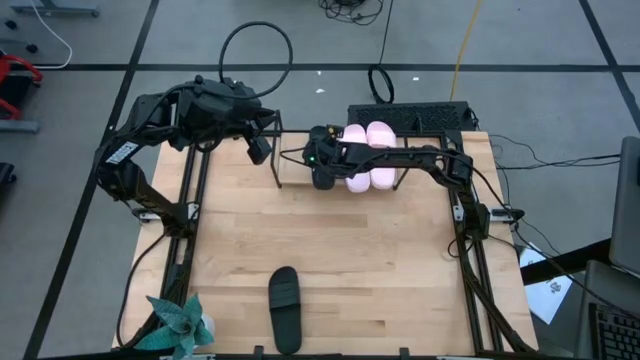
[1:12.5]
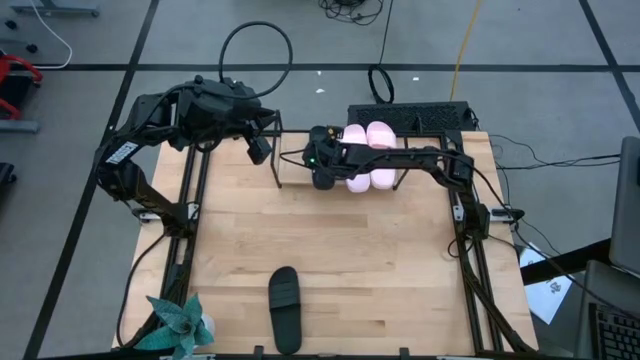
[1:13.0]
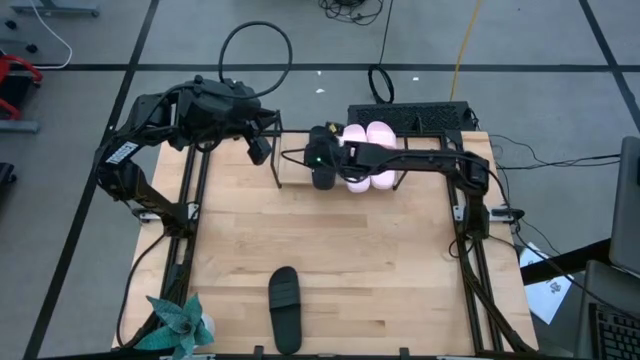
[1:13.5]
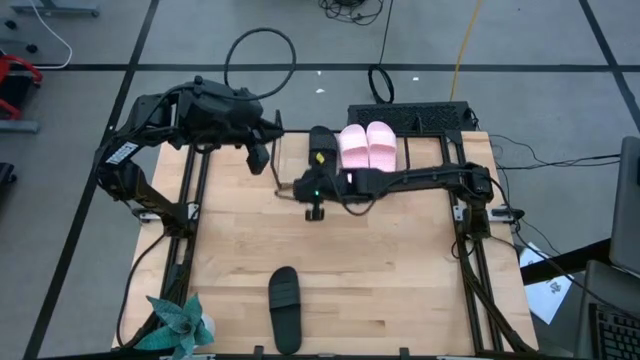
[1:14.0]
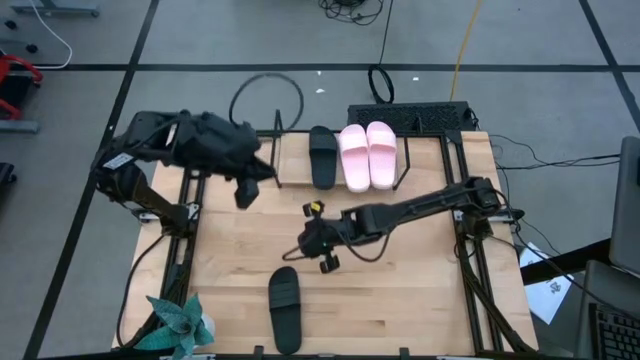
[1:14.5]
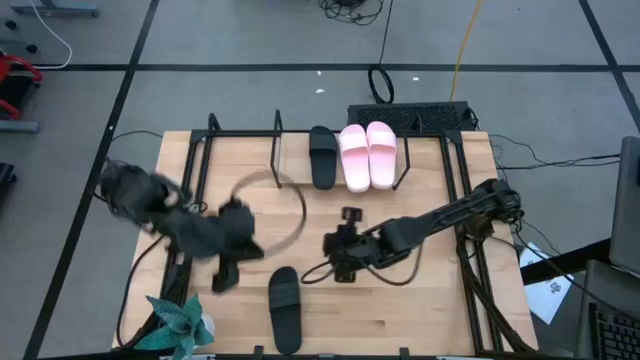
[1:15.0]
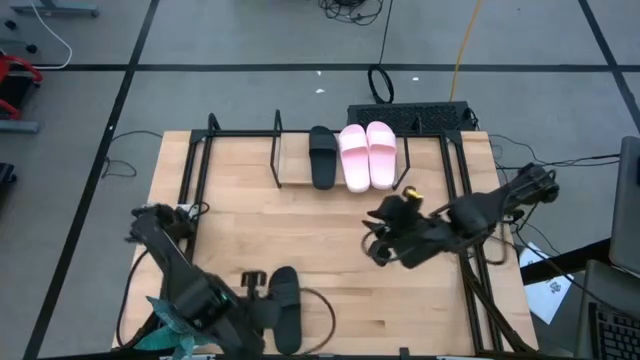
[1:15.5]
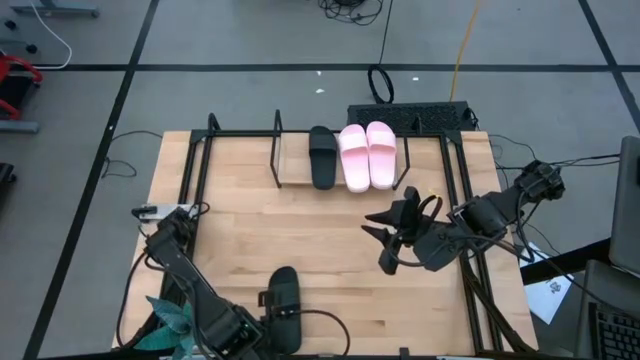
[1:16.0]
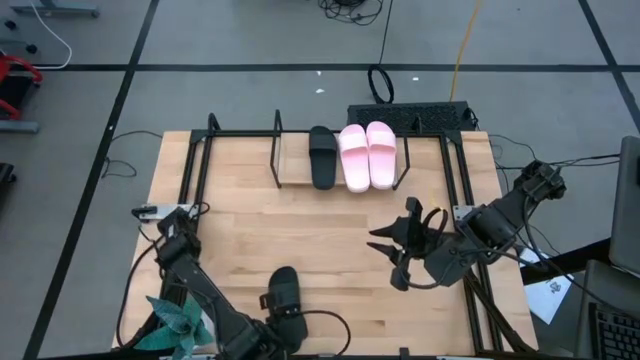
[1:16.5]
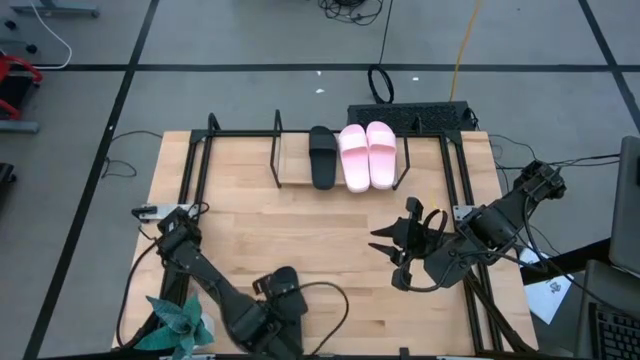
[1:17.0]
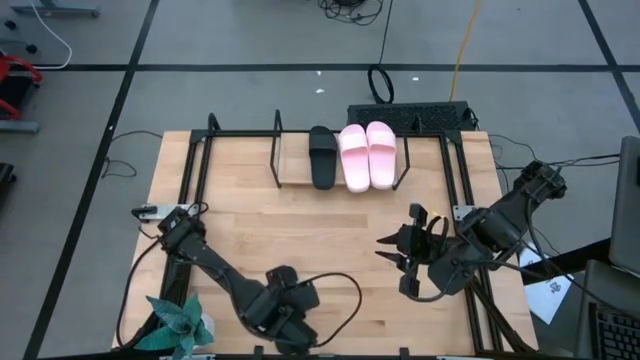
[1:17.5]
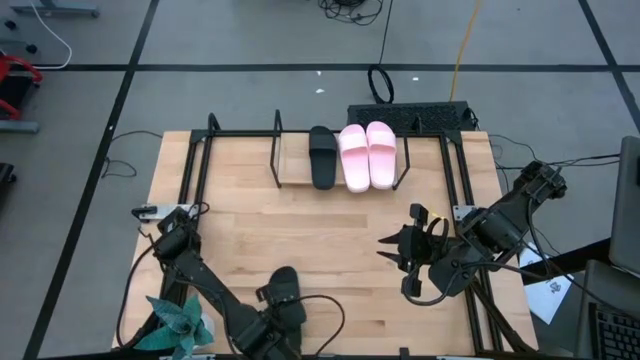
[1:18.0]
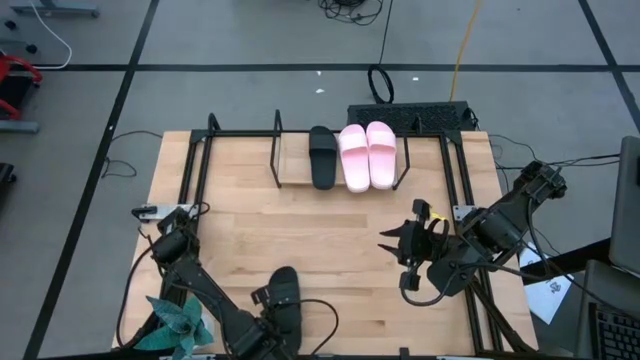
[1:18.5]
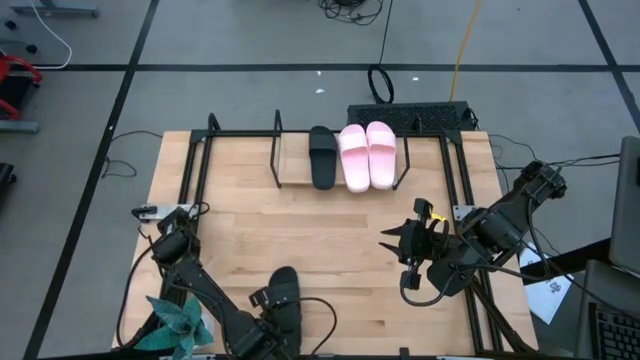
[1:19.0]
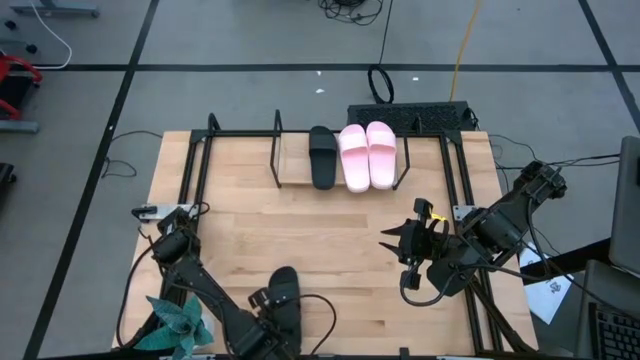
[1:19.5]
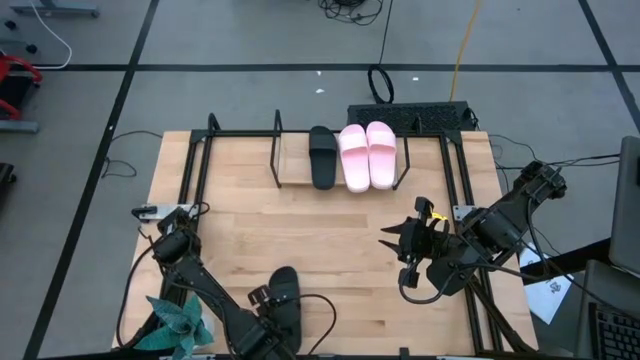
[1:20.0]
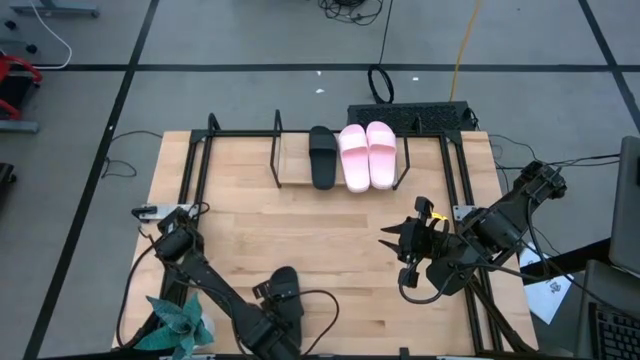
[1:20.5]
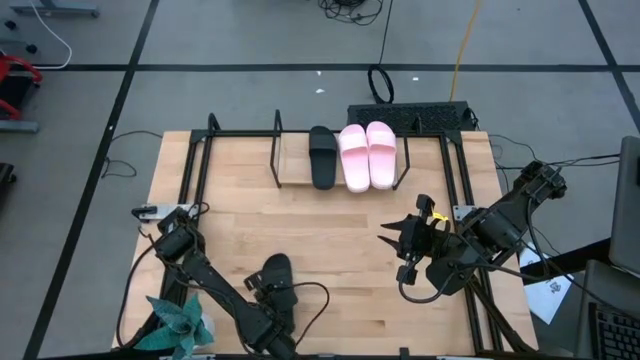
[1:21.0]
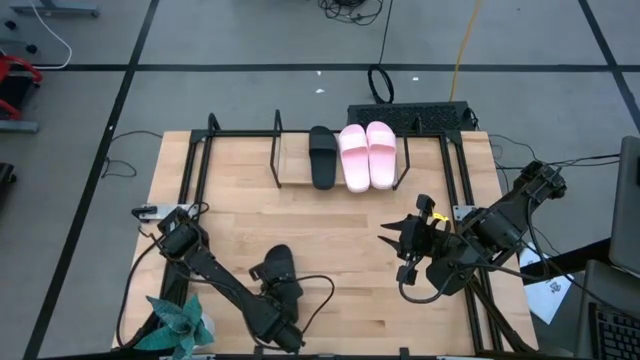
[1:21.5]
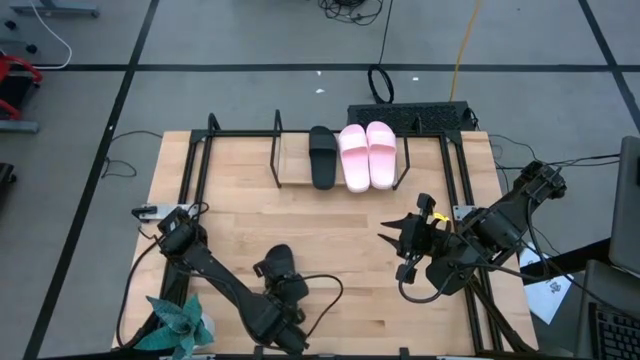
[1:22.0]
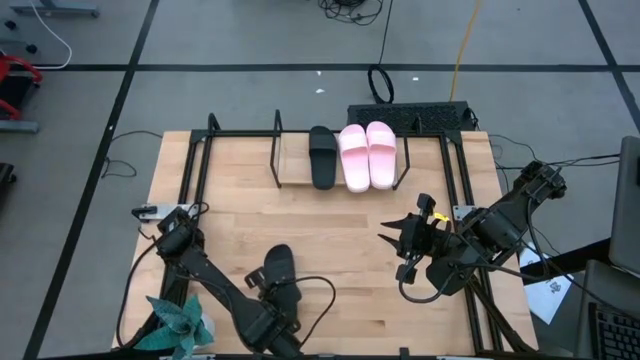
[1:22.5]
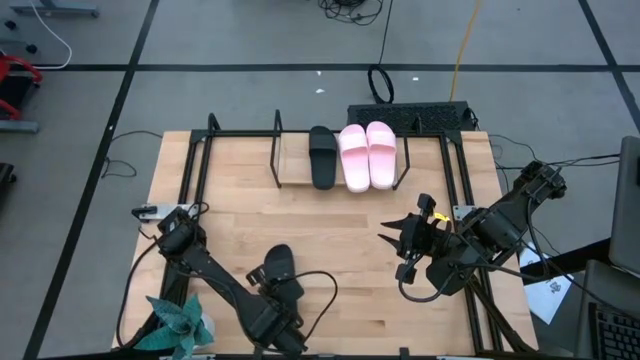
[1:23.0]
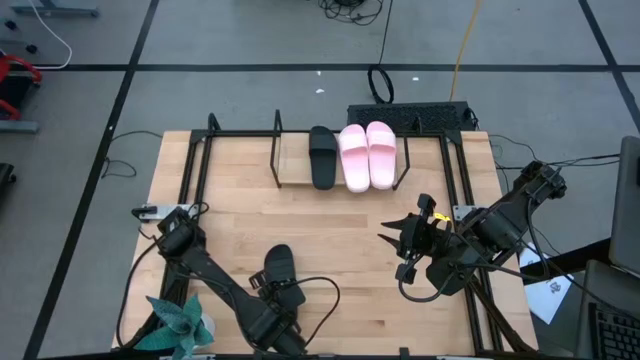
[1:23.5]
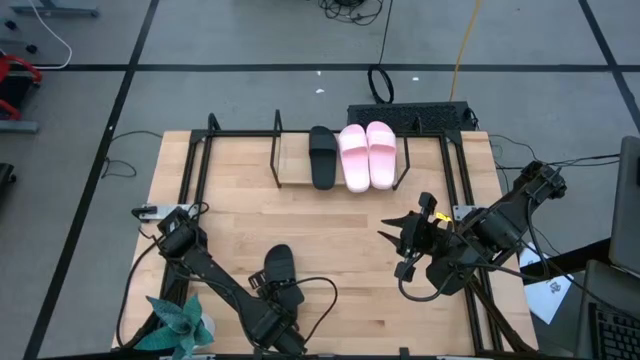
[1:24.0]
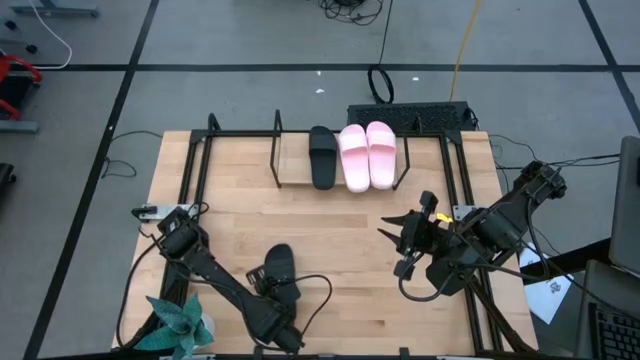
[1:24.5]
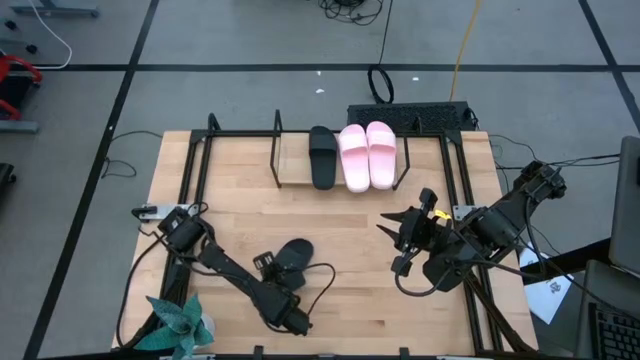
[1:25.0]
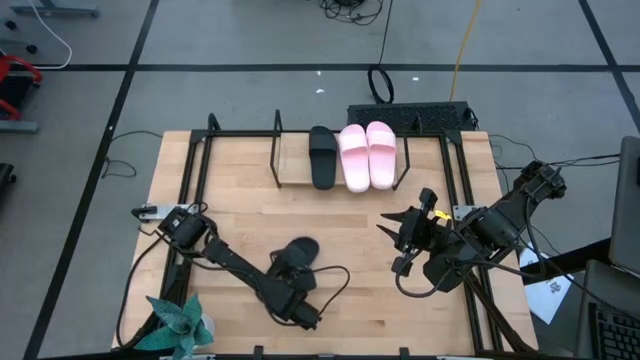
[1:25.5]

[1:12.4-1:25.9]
Task: Pick and place slides into the shelf
Put the black slide on the shelf

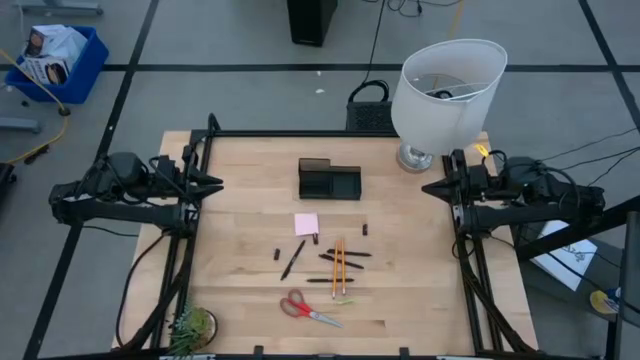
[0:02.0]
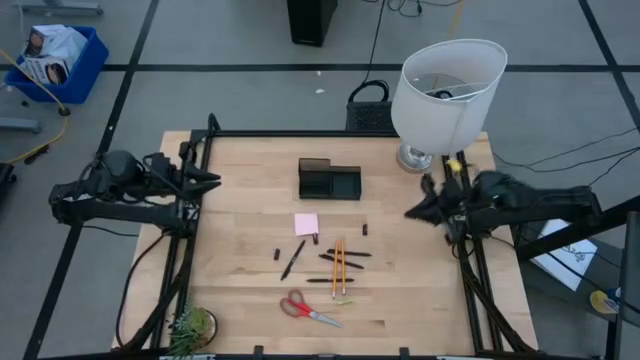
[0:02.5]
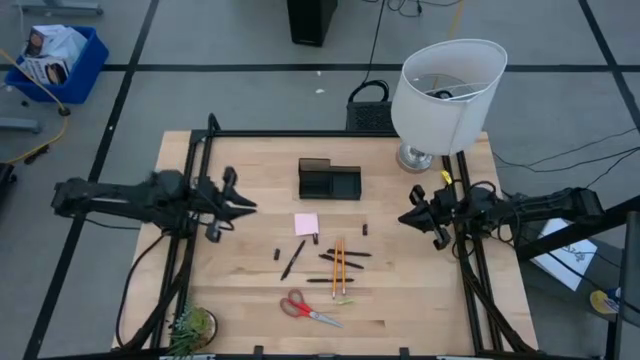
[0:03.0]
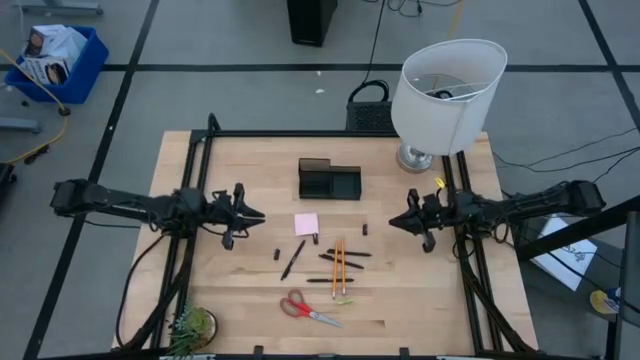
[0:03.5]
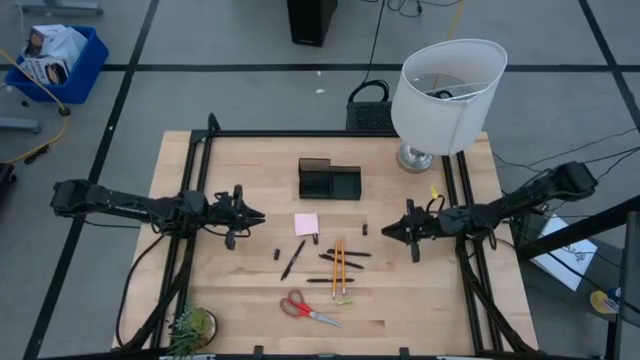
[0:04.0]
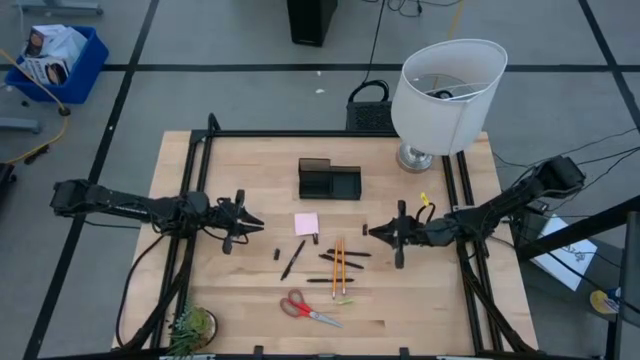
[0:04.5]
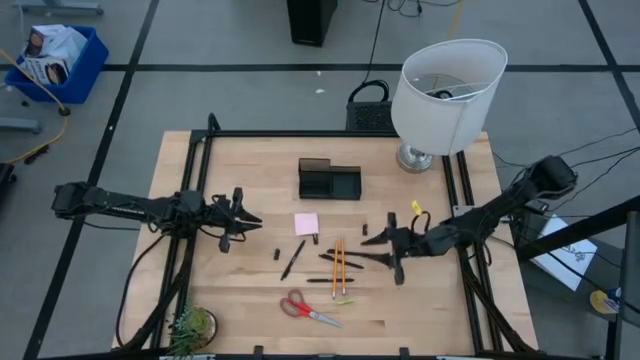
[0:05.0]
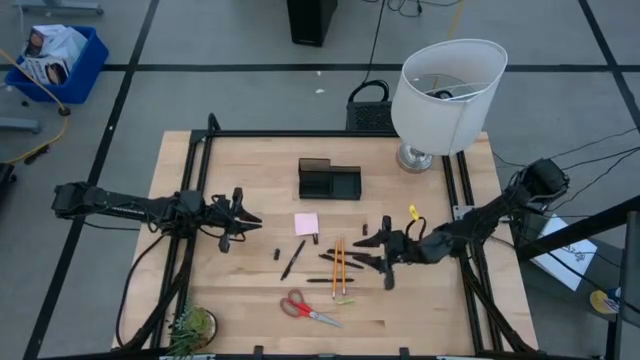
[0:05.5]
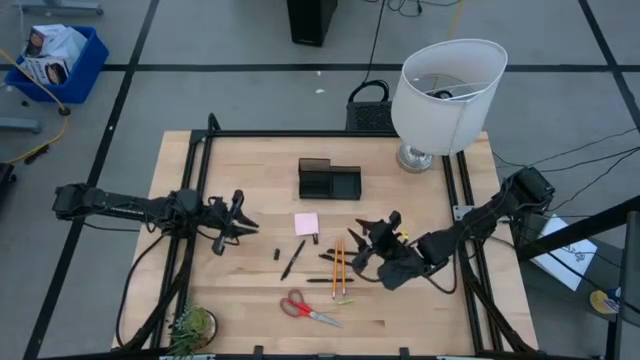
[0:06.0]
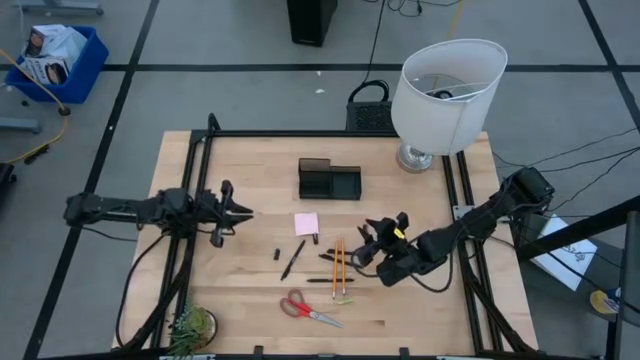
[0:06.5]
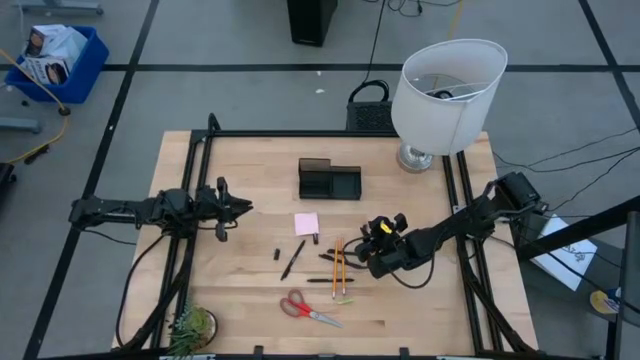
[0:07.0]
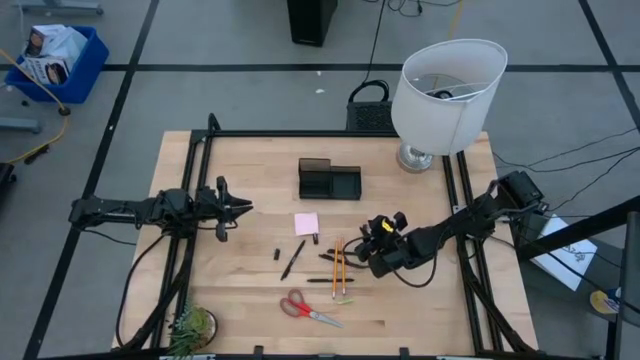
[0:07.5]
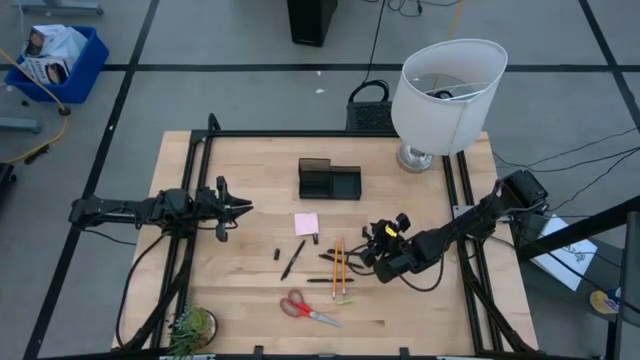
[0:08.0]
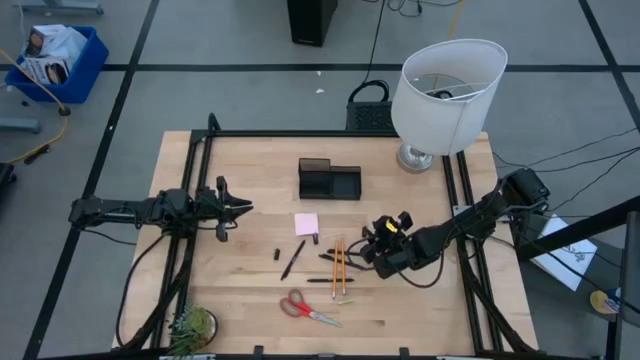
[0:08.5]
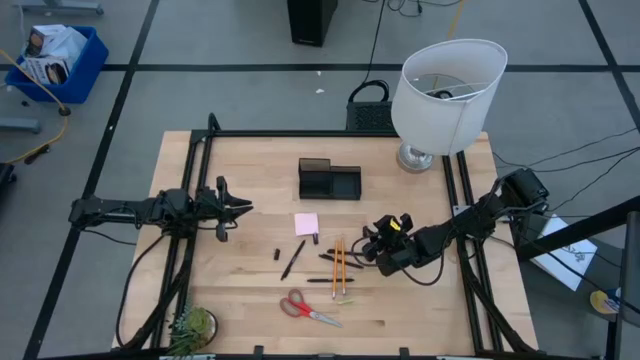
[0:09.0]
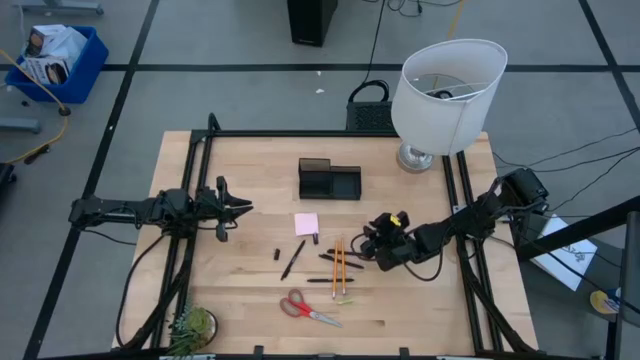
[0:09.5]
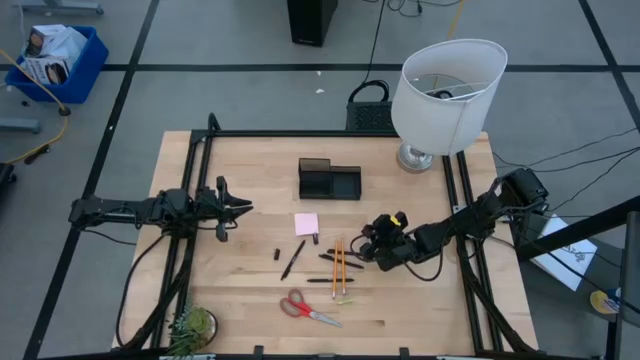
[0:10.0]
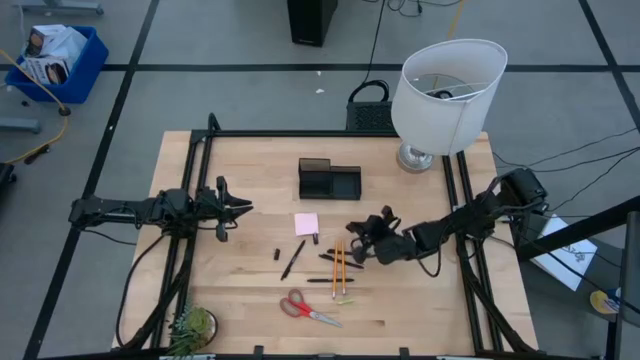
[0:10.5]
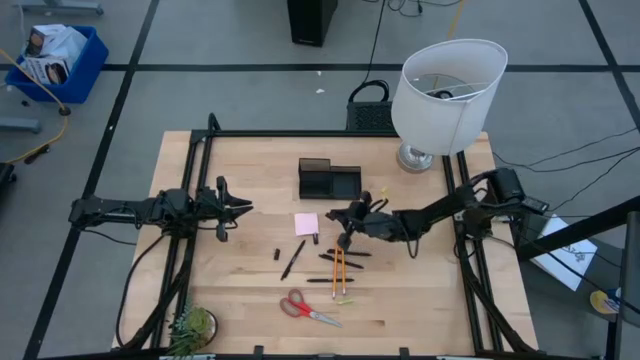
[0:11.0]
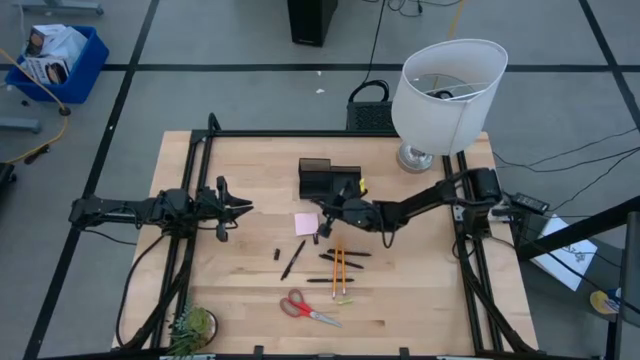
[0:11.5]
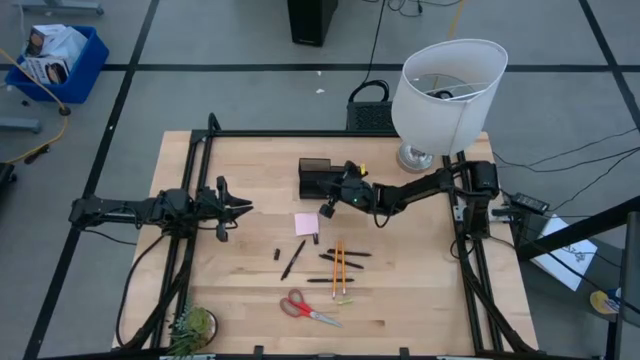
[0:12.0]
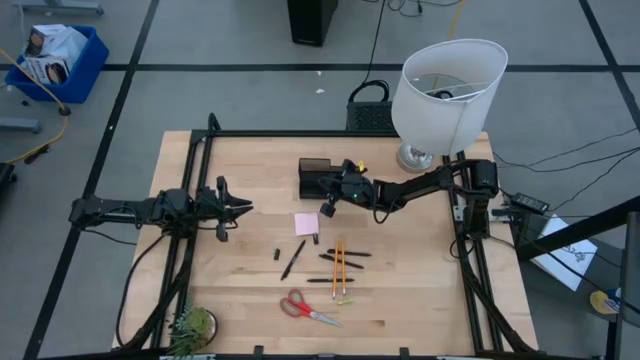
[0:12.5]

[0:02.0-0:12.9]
Task: Pick and place office supplies into organizer
Put the black binder clip into the desk organizer
